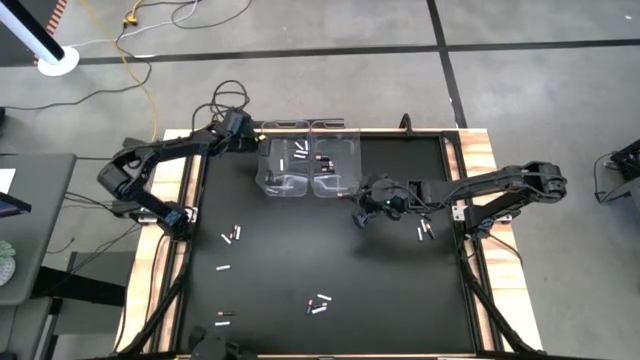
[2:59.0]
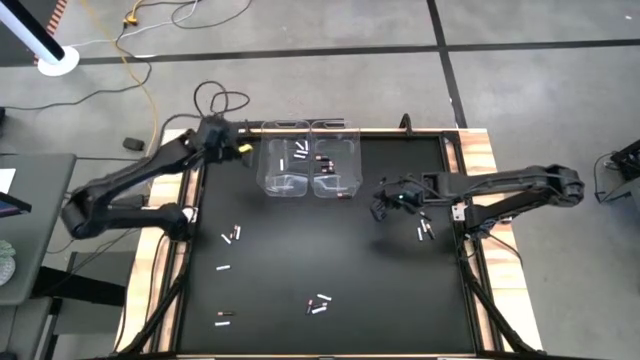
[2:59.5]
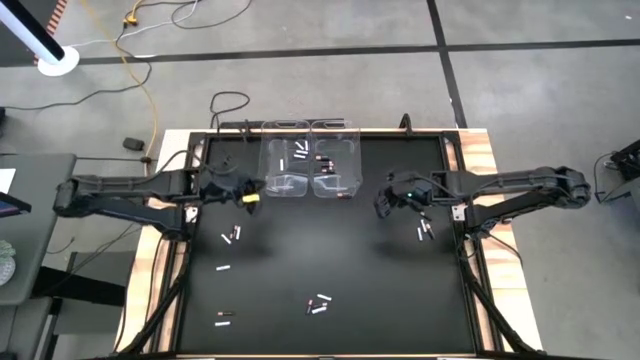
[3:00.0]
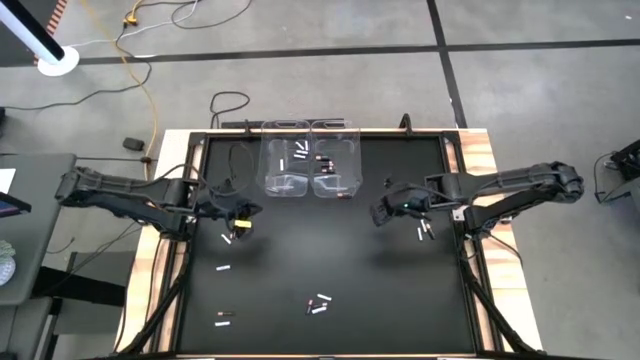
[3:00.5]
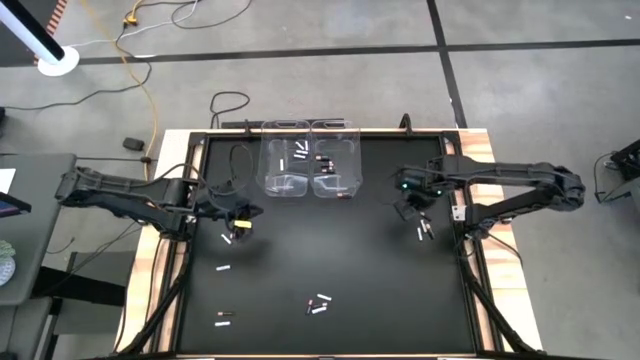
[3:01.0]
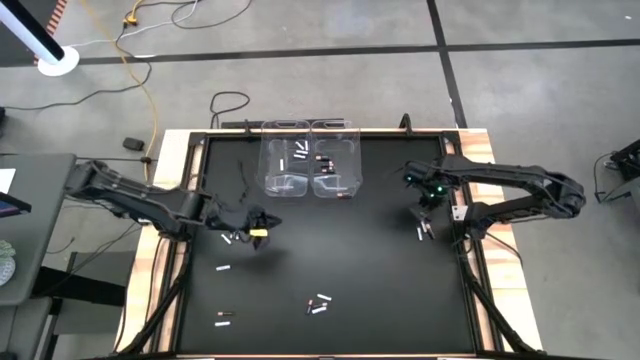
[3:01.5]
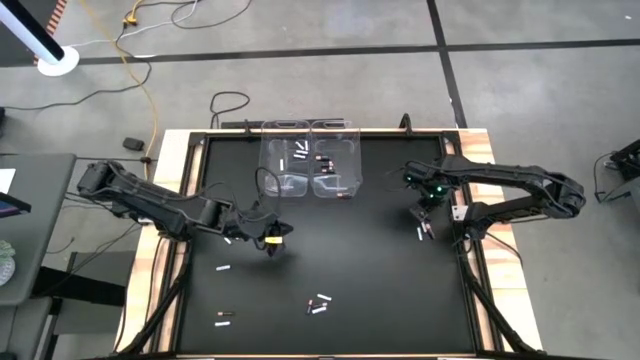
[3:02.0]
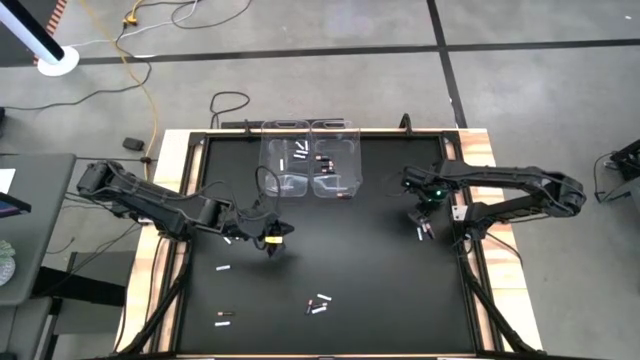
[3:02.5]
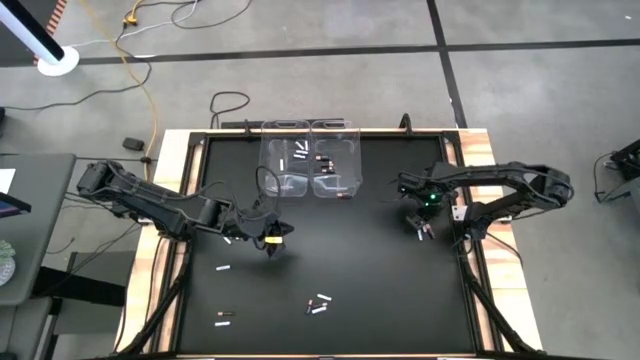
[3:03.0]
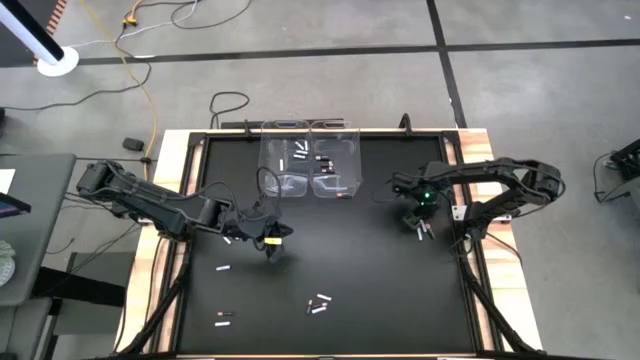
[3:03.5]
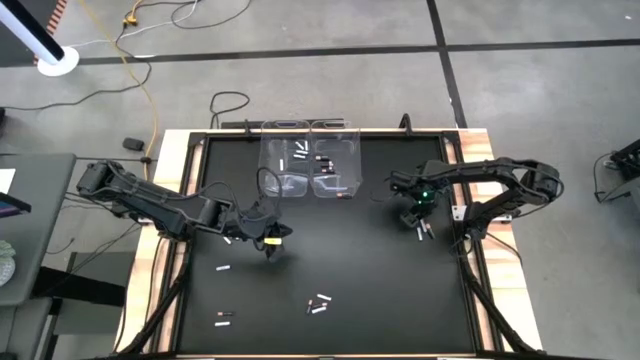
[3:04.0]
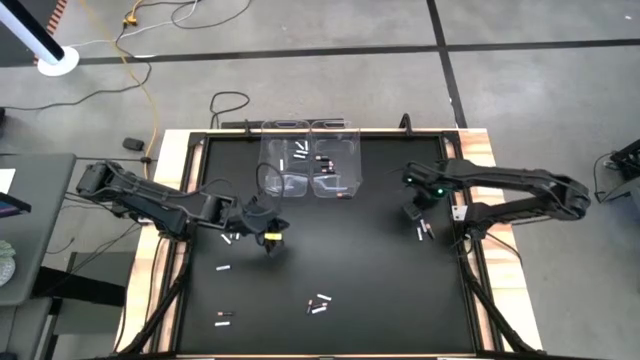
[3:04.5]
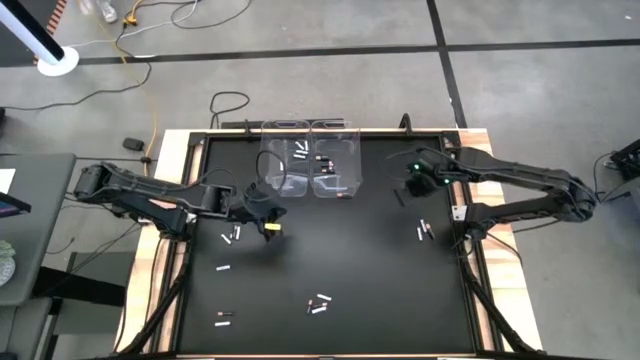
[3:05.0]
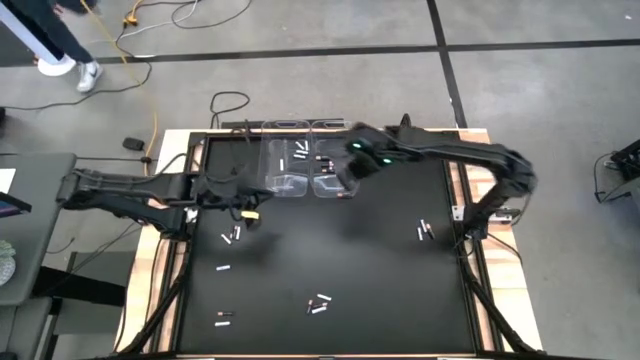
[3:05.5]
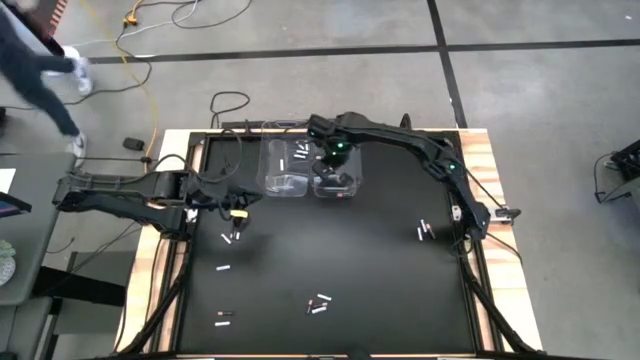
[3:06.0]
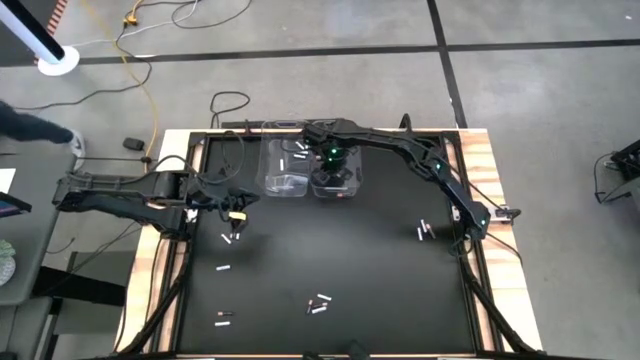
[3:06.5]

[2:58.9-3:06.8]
Task: Sort batteries
Put the black battery into the right transparent bin

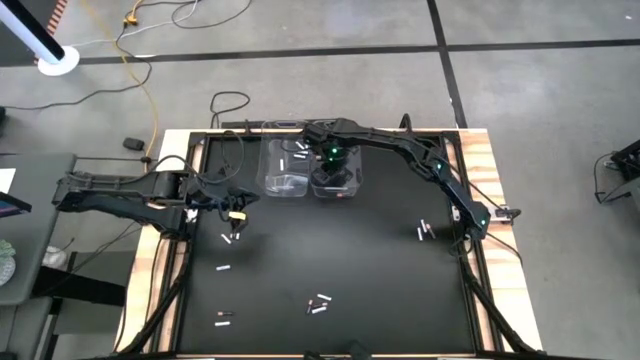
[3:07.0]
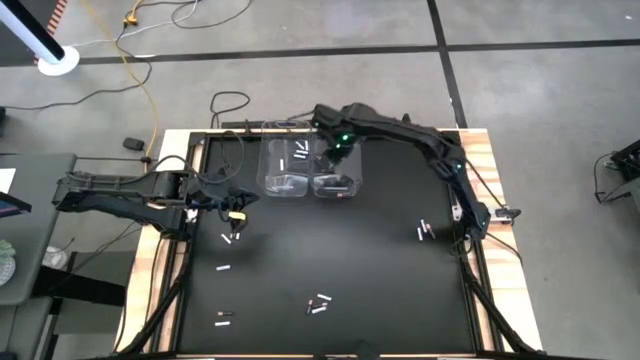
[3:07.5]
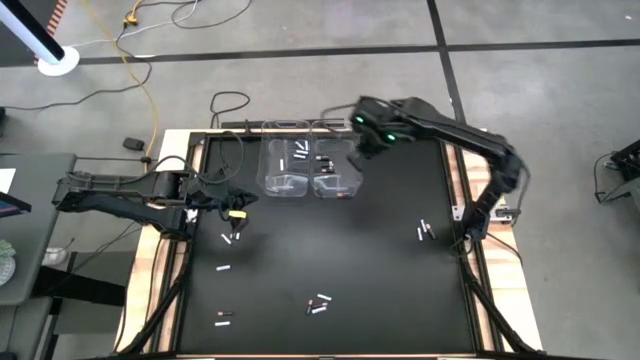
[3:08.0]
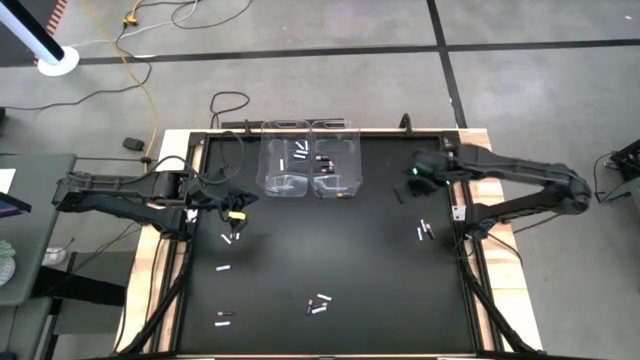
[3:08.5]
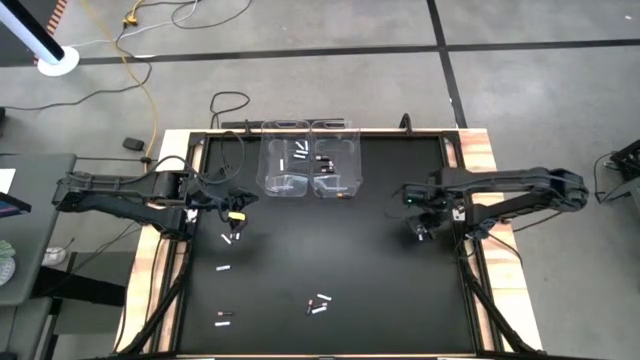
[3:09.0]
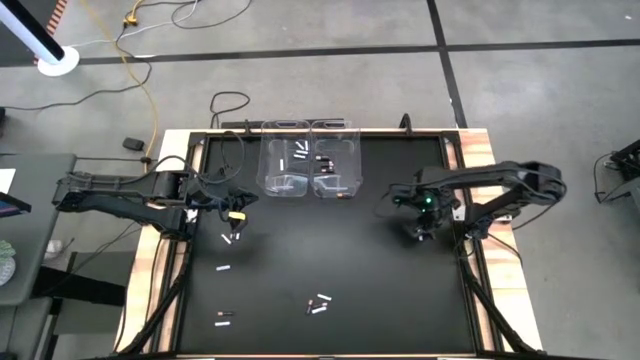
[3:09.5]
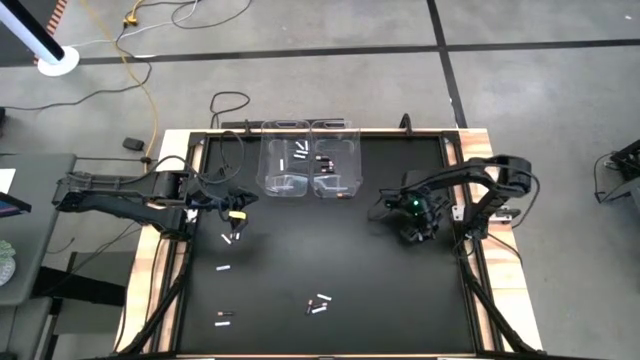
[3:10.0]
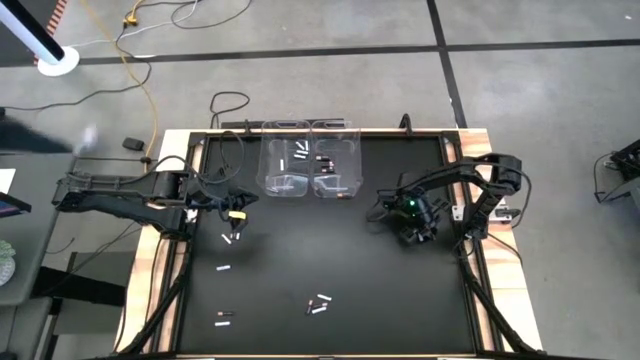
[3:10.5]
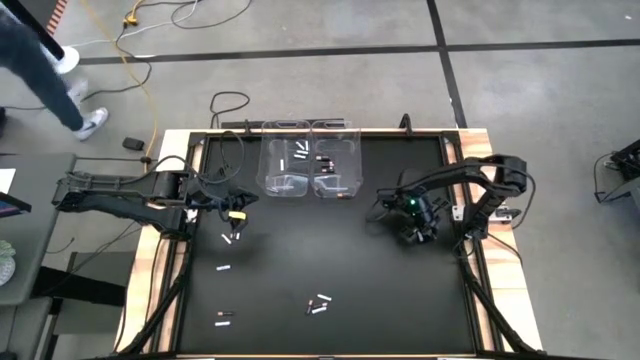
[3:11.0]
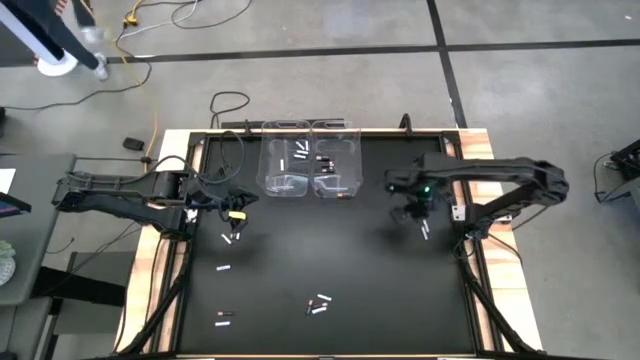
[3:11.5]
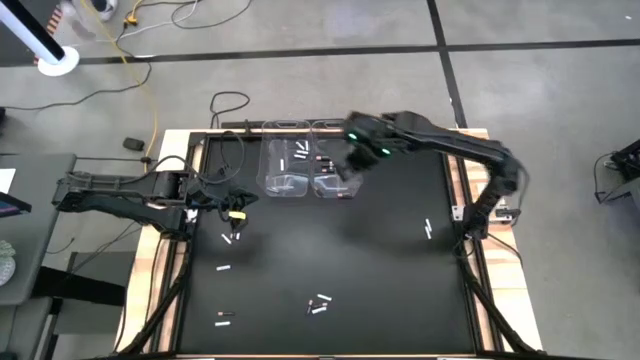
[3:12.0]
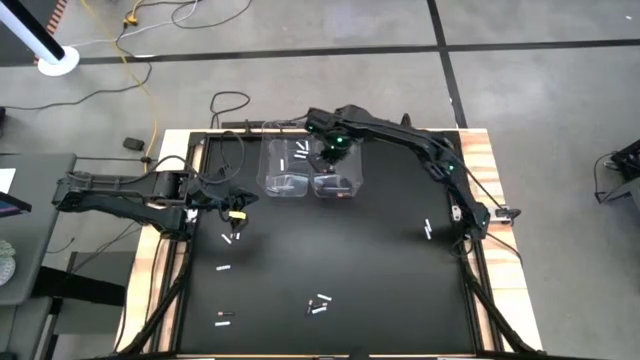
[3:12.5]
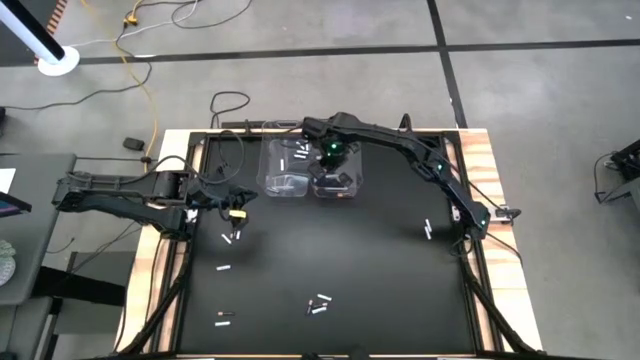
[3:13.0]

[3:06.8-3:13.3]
Put the black battery into the right transparent bin

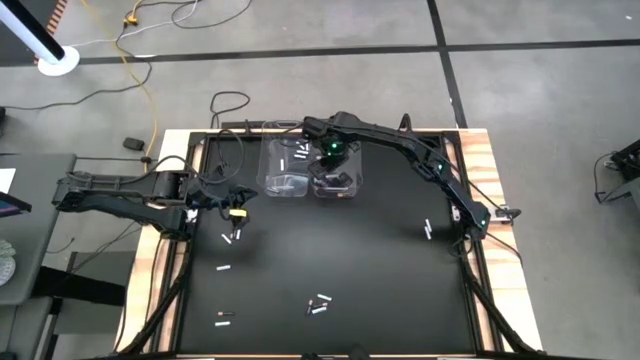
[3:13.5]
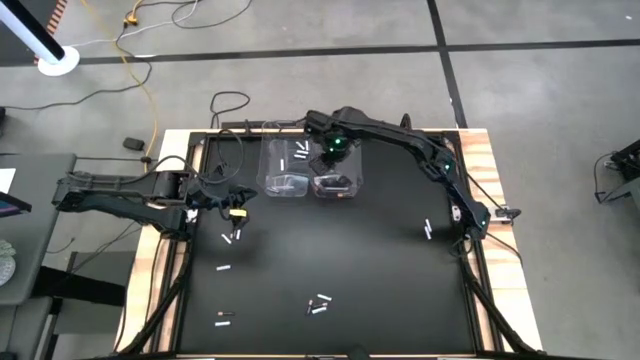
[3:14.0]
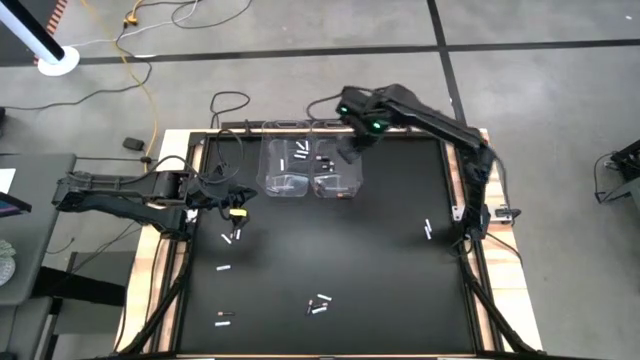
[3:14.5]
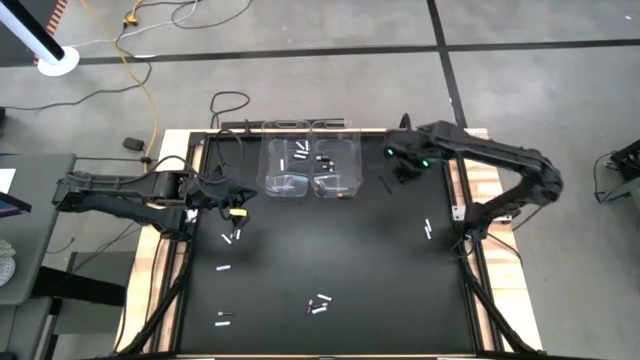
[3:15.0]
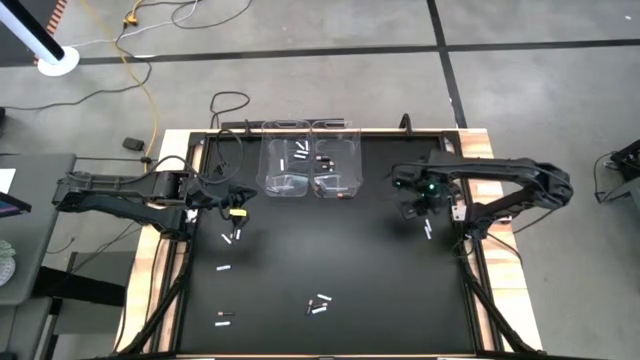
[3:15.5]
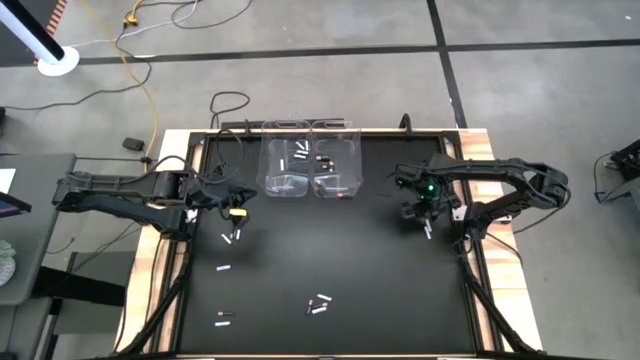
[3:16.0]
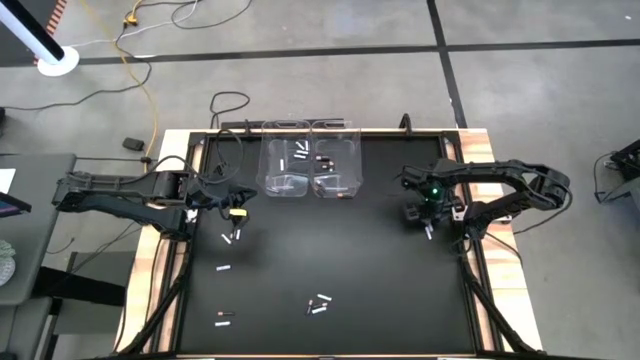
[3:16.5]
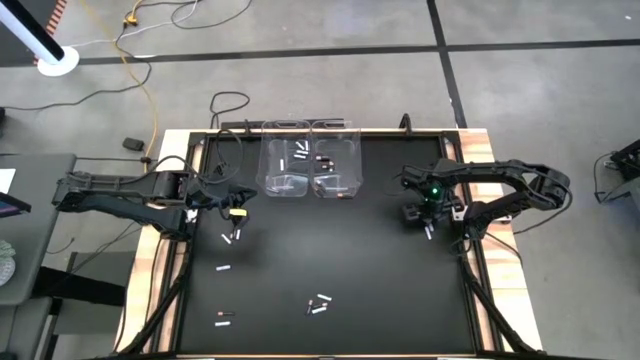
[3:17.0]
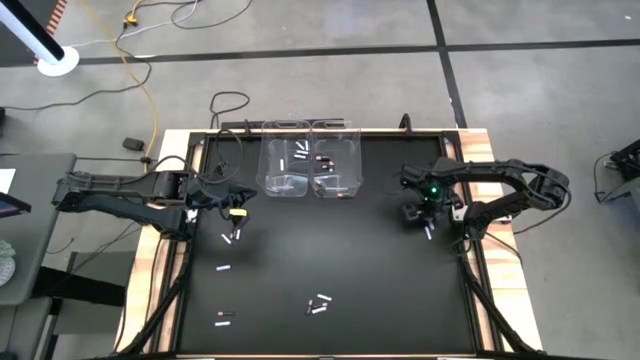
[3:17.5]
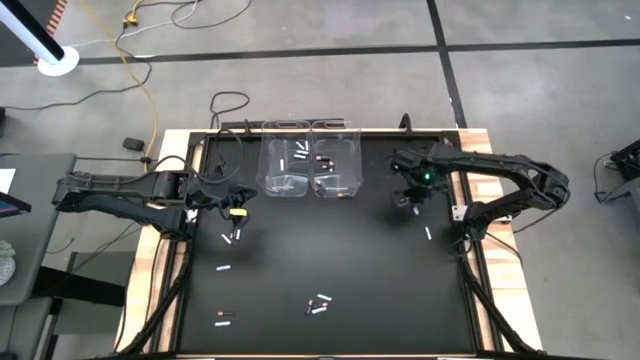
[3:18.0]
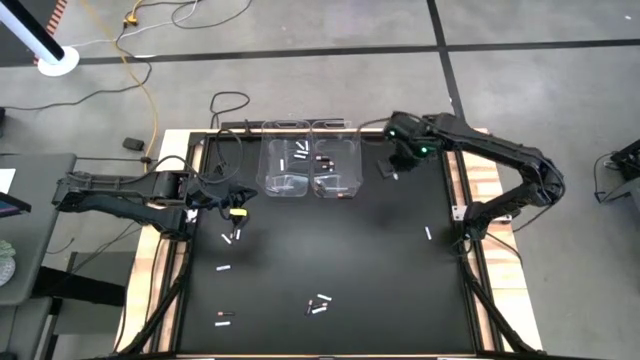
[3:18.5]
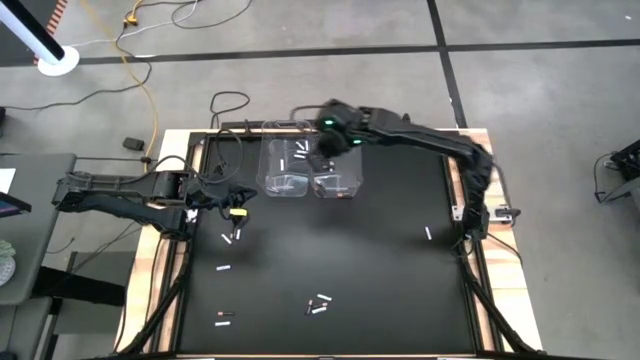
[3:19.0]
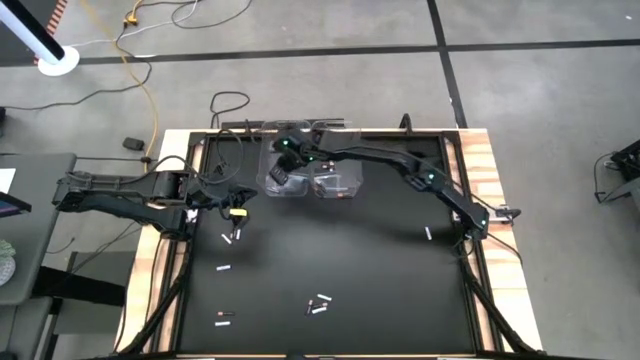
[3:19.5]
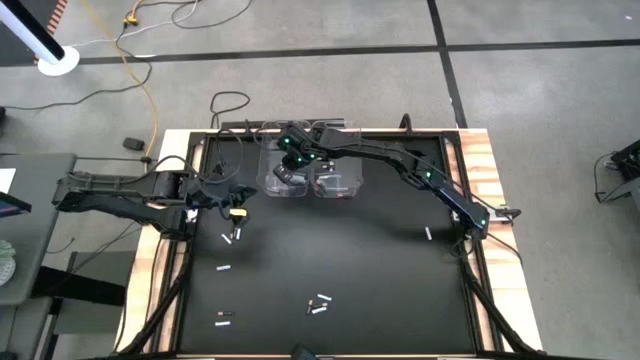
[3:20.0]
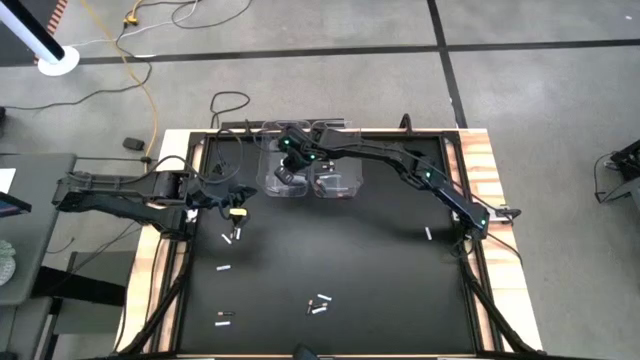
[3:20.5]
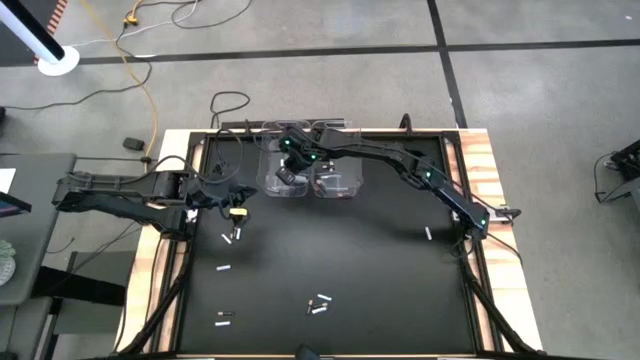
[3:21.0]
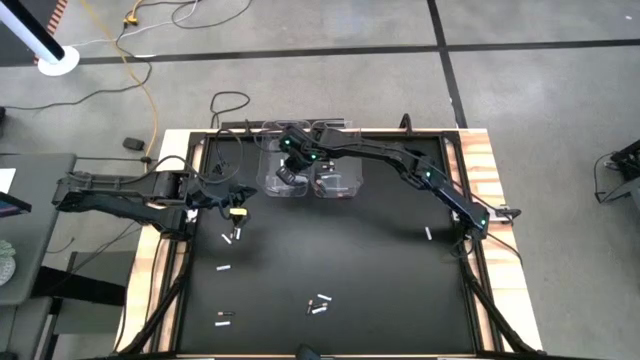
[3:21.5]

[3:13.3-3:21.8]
Put the white battery into the left transparent bin
